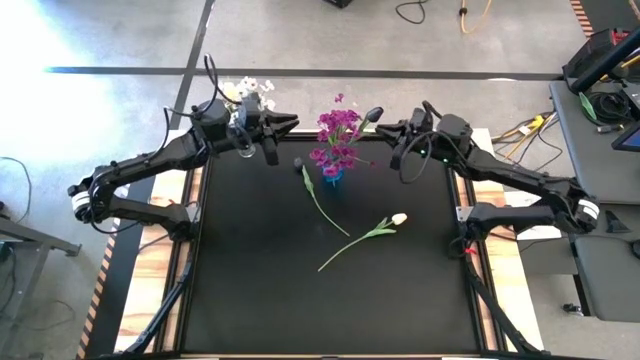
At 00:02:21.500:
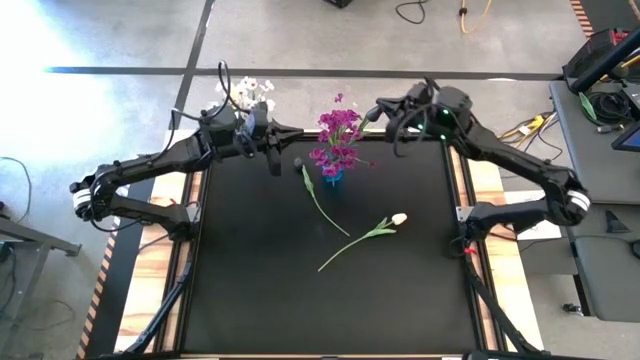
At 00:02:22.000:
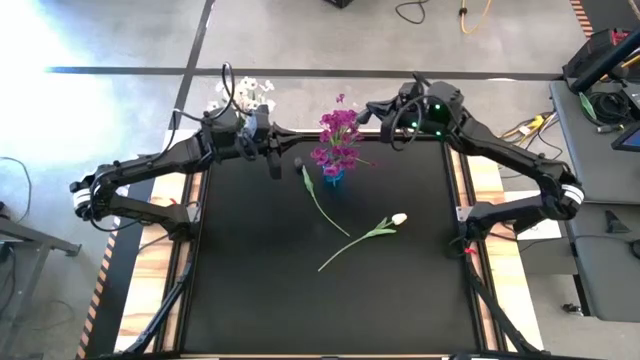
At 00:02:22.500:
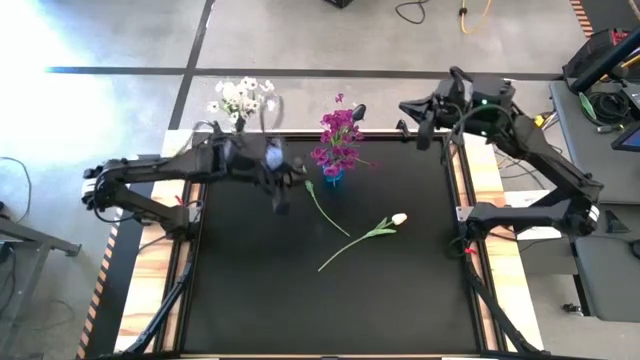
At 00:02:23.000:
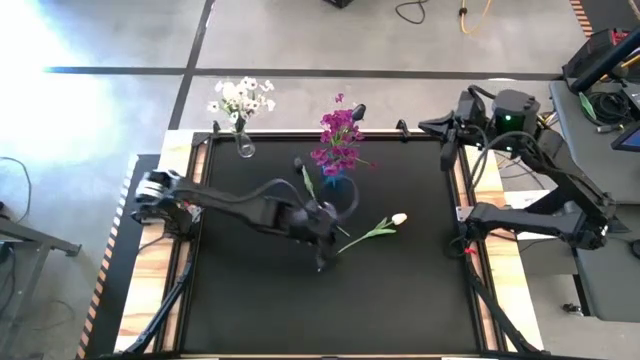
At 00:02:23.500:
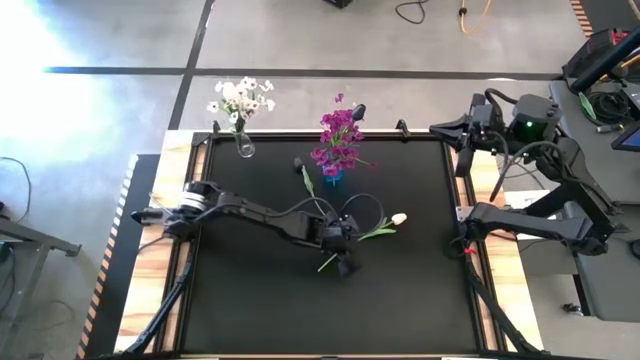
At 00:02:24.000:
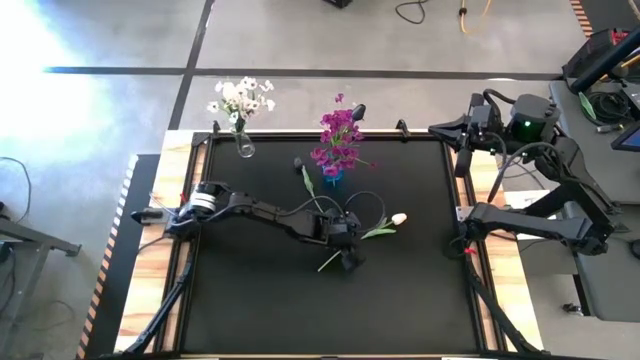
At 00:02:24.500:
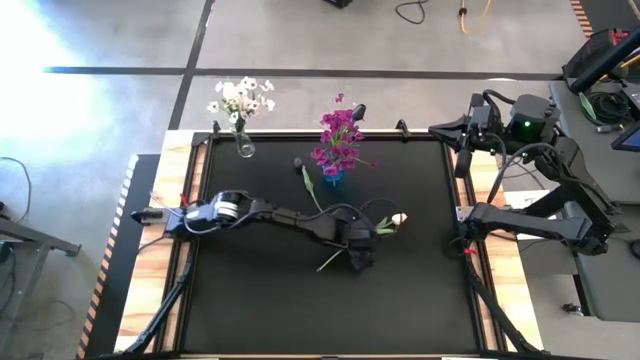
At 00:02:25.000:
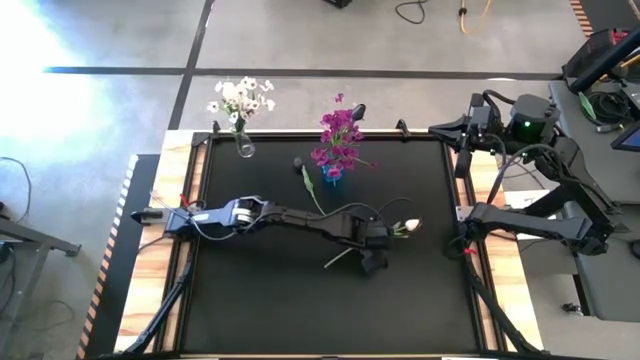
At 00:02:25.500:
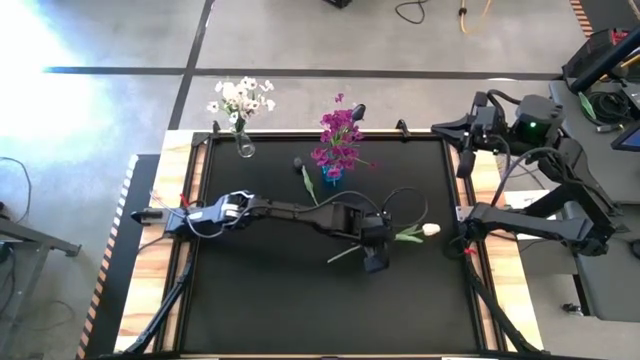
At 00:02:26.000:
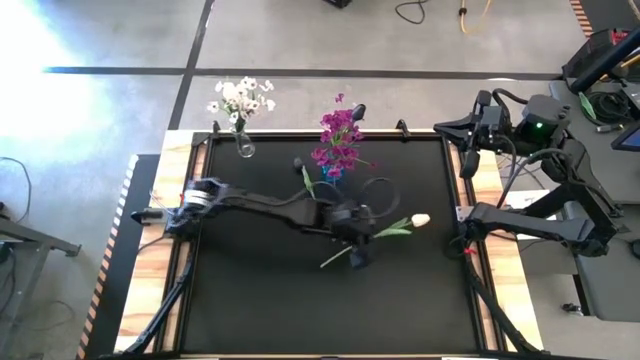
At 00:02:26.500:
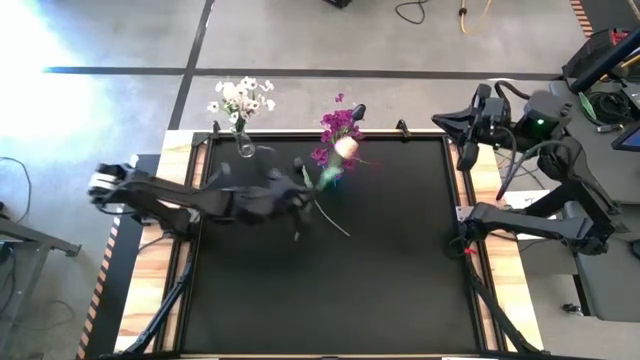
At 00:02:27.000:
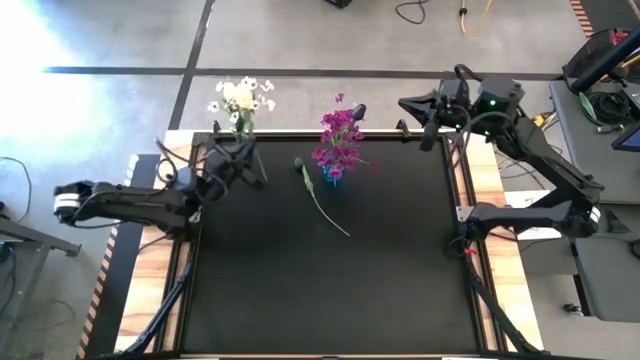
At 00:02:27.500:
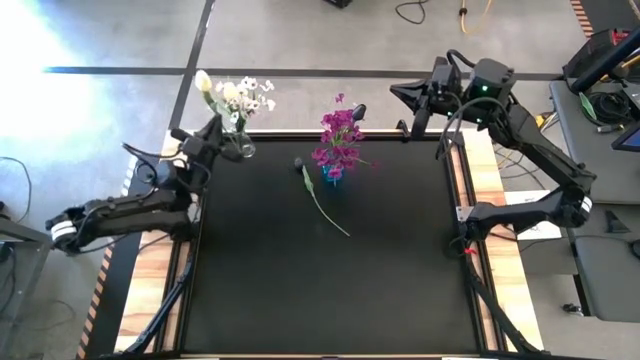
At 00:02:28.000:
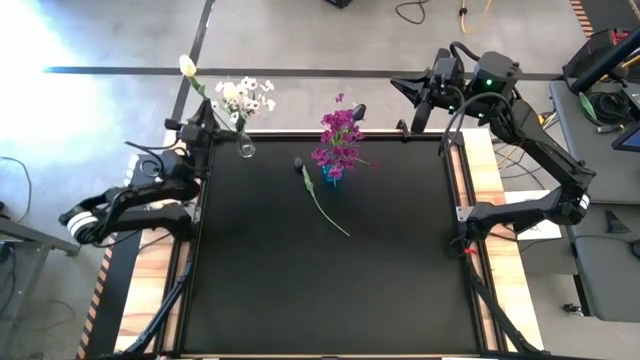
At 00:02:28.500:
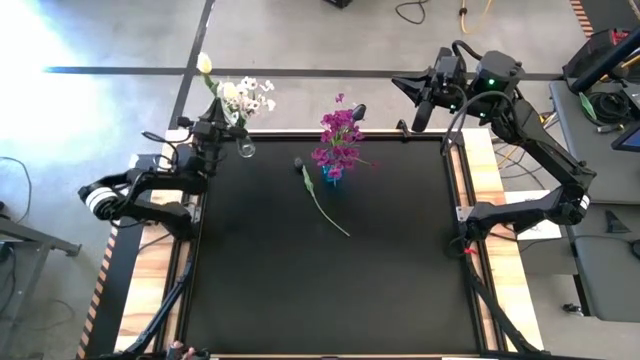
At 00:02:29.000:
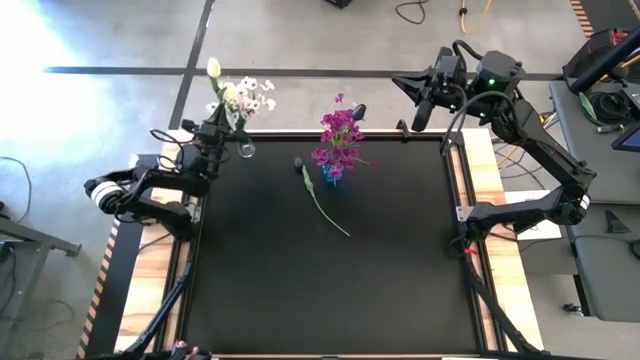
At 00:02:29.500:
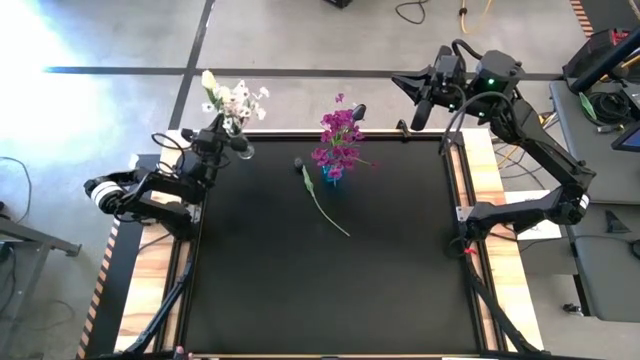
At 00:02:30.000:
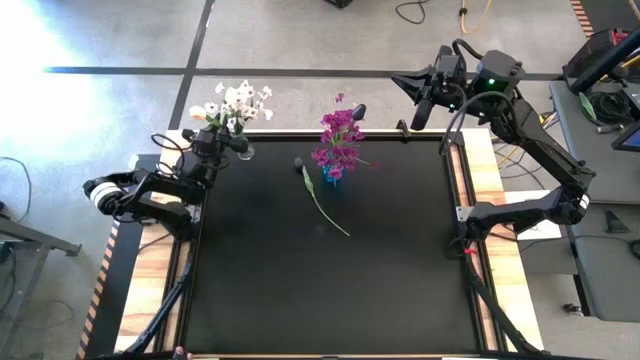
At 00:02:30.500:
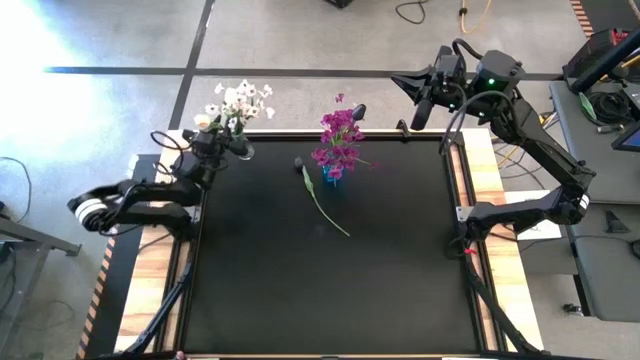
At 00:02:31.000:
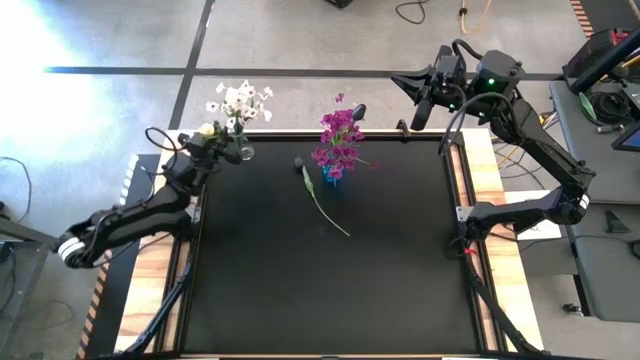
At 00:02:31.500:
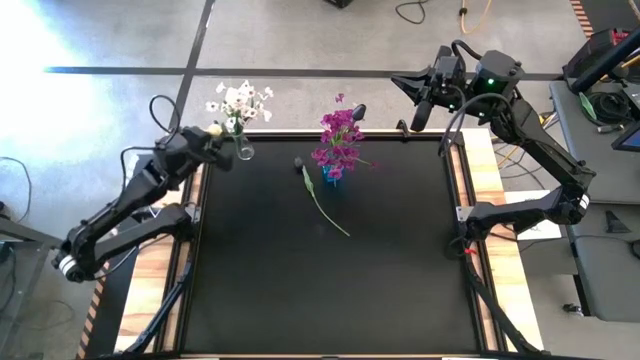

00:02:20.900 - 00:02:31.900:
Task: Sort flowers into vase by color
Put the white flower into the transparent vase

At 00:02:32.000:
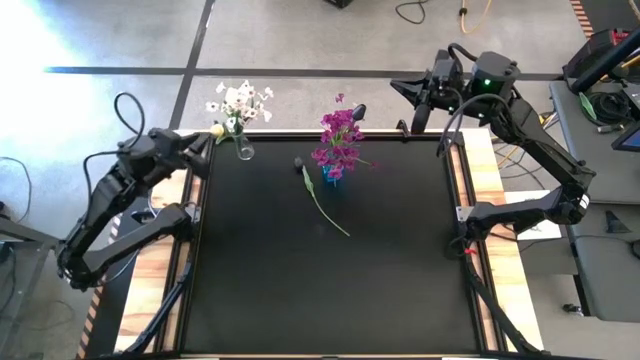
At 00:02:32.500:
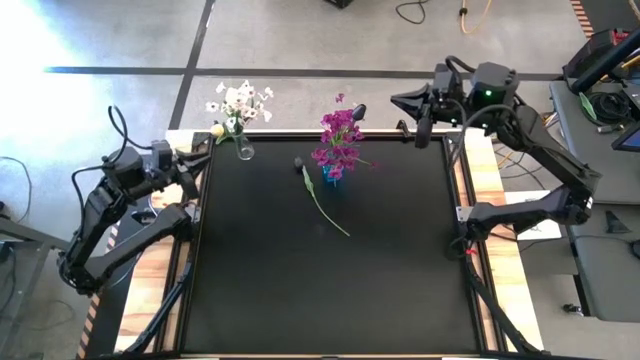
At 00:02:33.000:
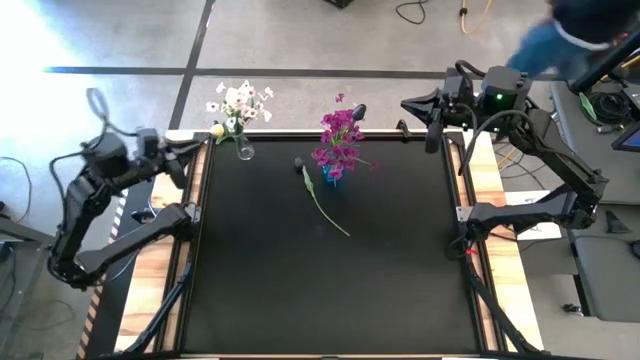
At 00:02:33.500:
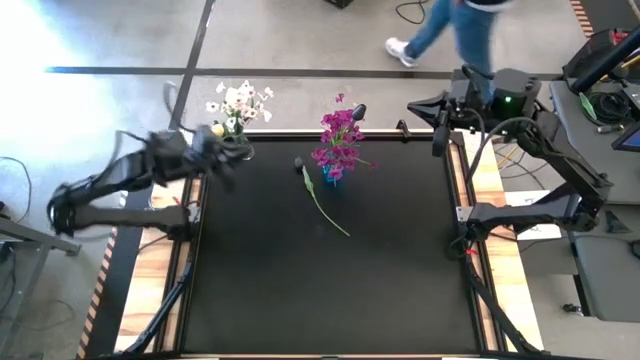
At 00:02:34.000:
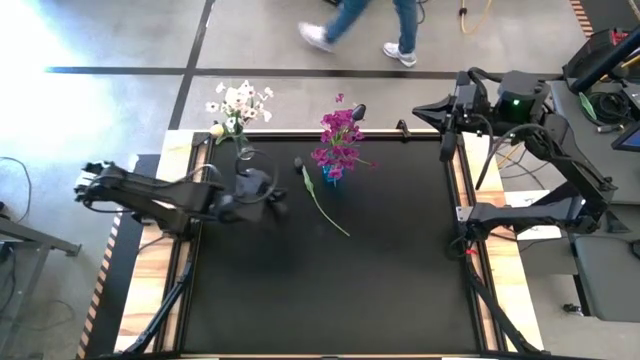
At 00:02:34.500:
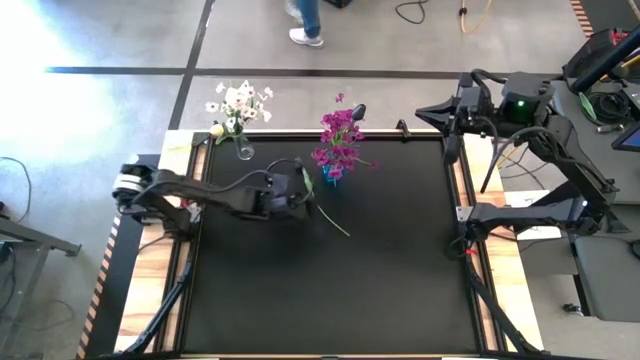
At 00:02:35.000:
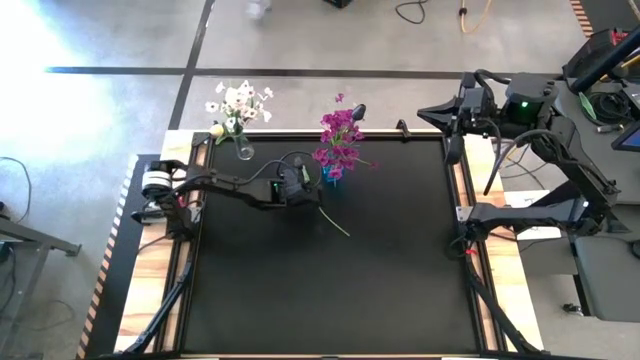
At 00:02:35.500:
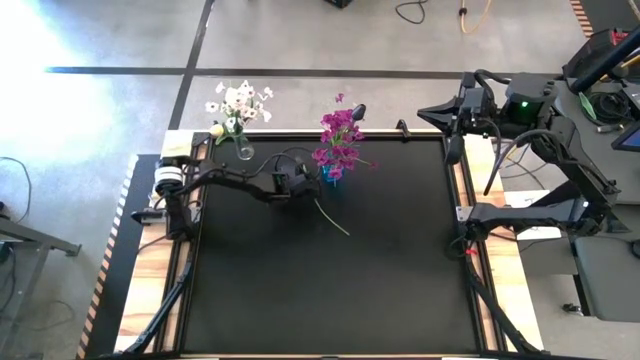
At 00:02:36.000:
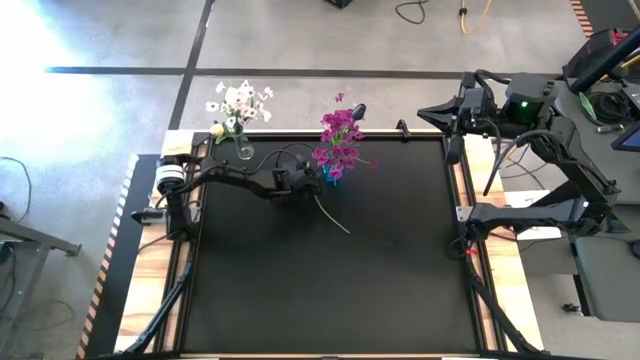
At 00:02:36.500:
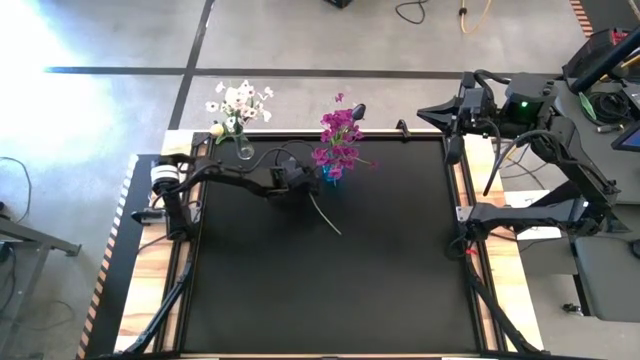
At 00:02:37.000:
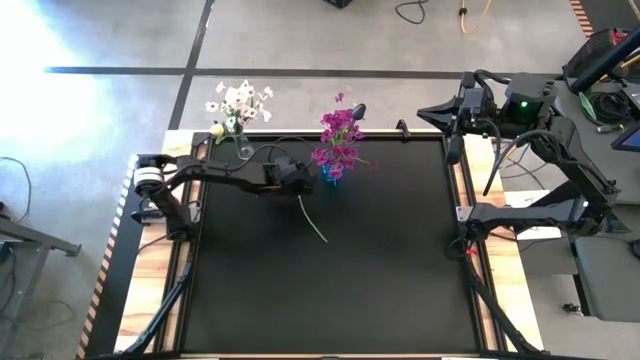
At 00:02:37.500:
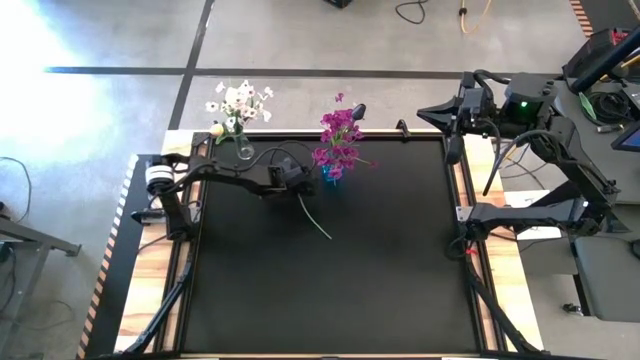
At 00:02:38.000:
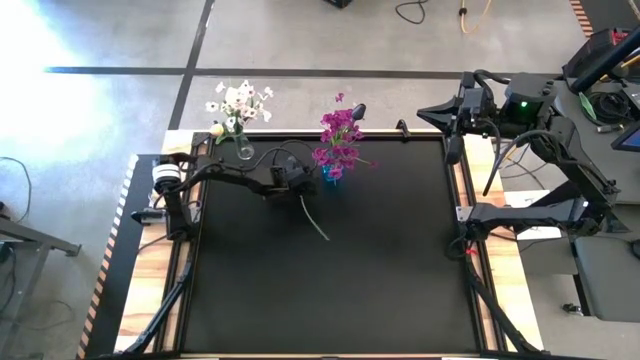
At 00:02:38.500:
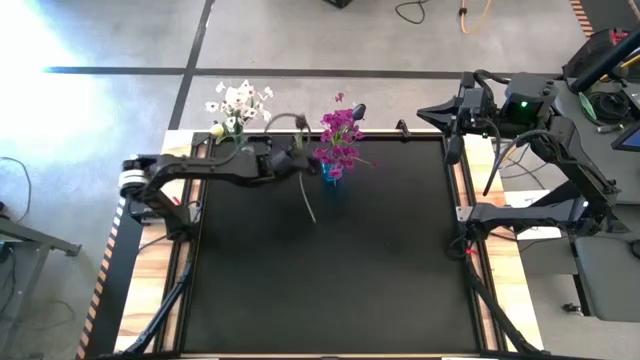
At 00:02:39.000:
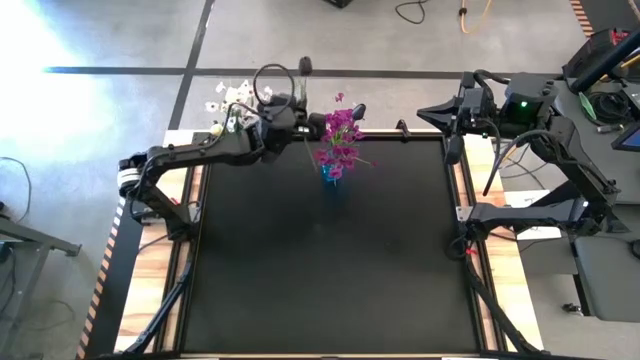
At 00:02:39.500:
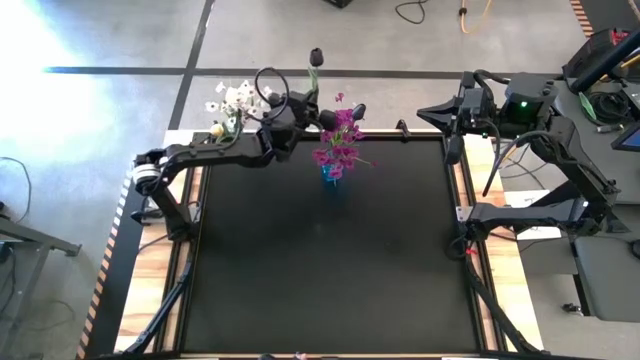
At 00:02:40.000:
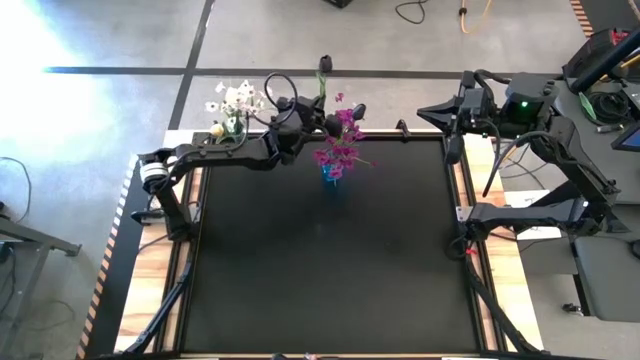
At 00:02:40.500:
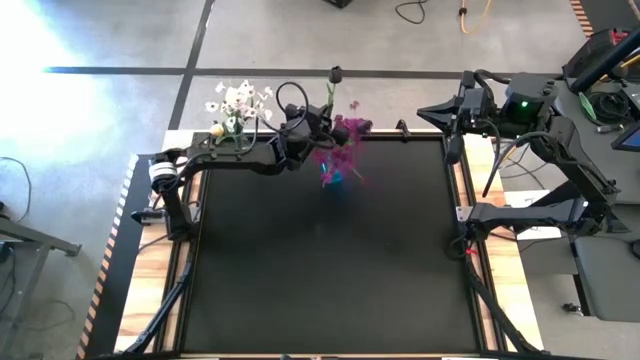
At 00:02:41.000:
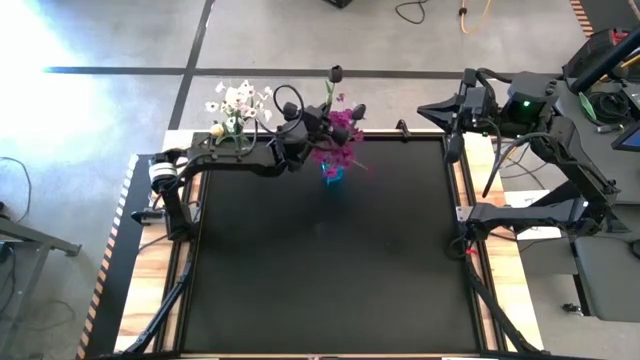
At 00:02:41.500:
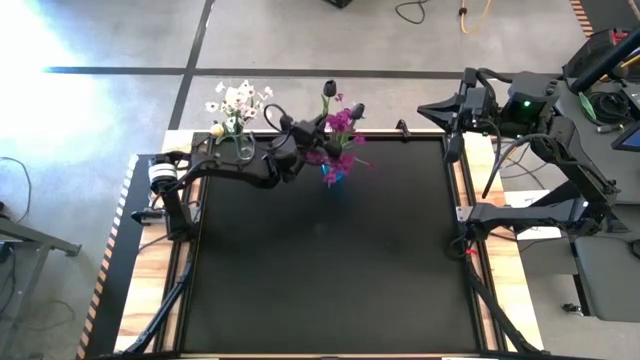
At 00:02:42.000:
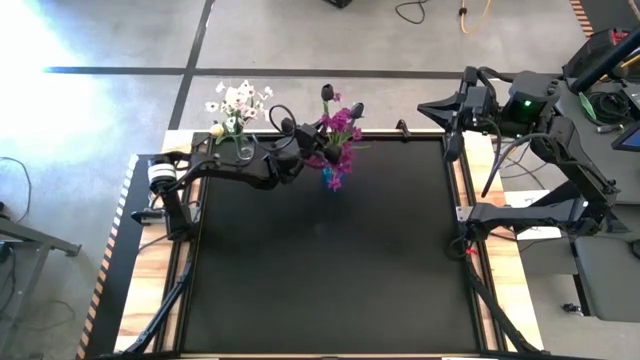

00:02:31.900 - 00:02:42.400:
Put the black flower into the blue vase
